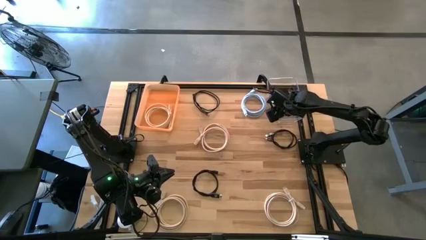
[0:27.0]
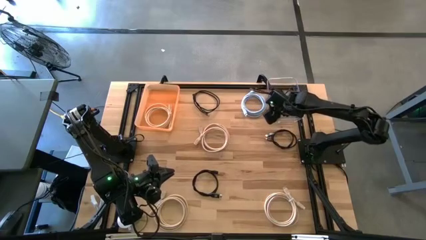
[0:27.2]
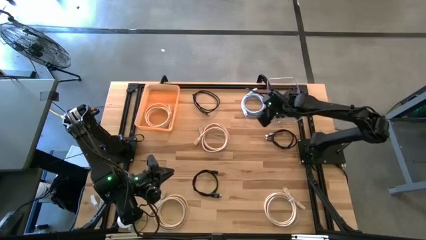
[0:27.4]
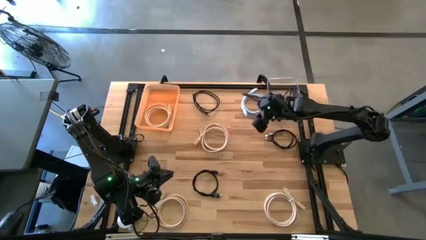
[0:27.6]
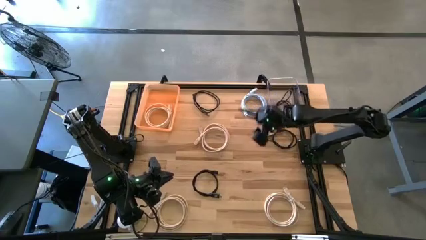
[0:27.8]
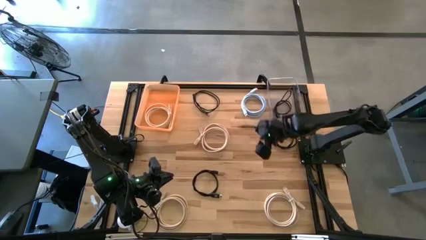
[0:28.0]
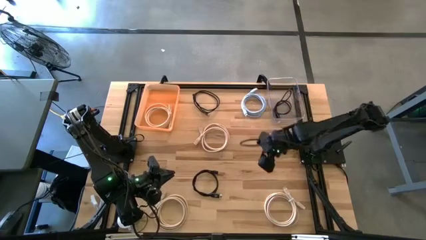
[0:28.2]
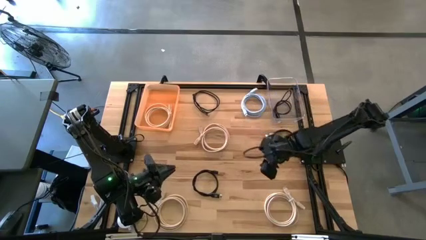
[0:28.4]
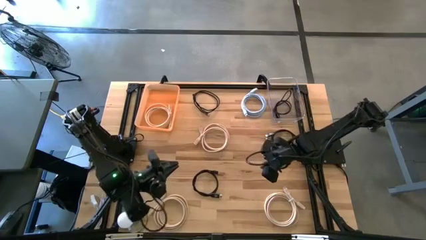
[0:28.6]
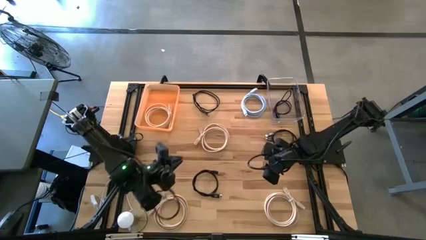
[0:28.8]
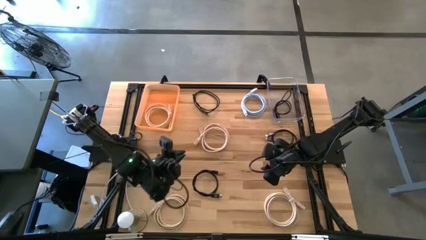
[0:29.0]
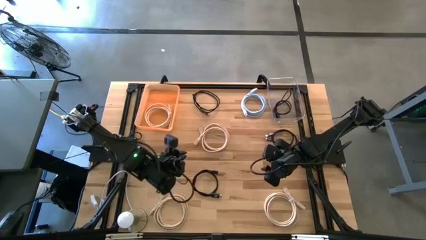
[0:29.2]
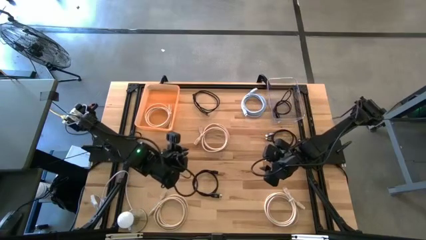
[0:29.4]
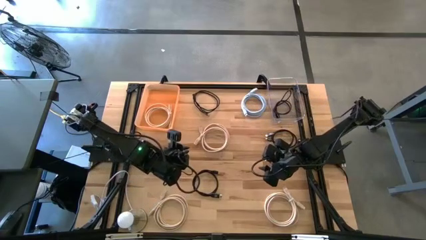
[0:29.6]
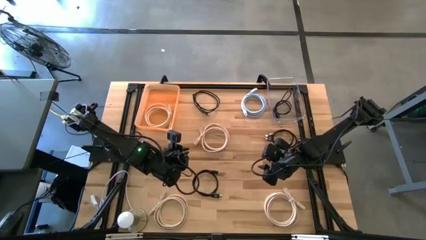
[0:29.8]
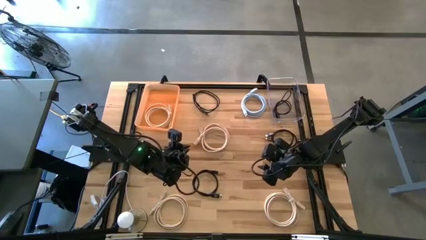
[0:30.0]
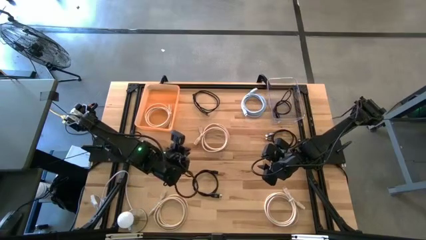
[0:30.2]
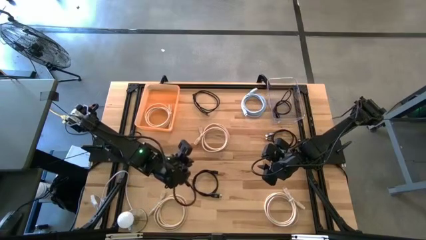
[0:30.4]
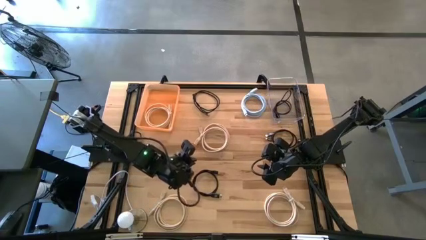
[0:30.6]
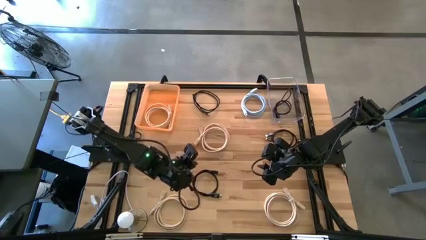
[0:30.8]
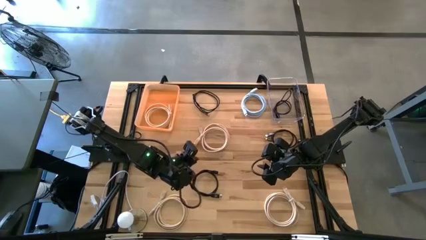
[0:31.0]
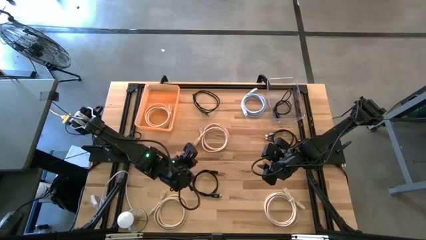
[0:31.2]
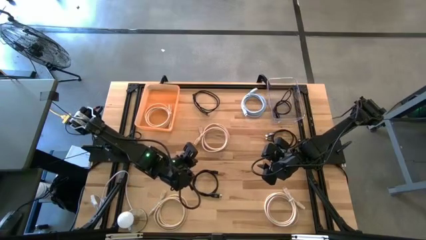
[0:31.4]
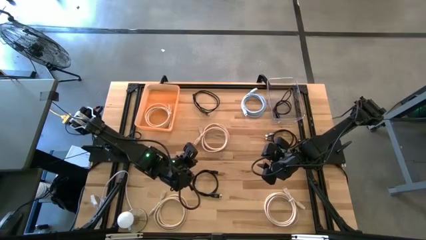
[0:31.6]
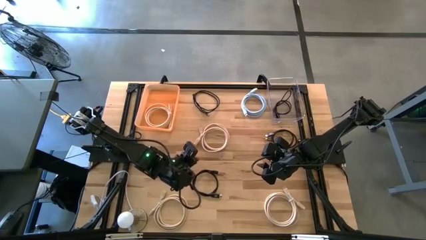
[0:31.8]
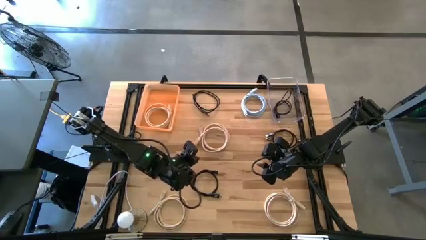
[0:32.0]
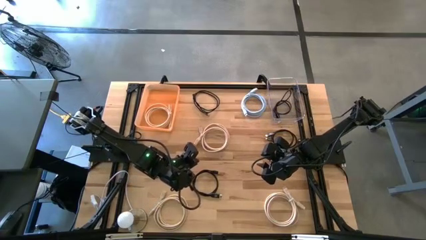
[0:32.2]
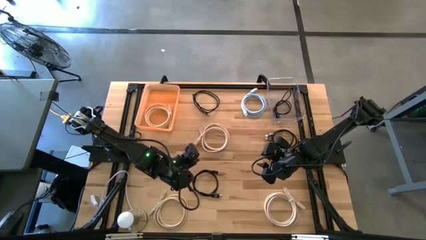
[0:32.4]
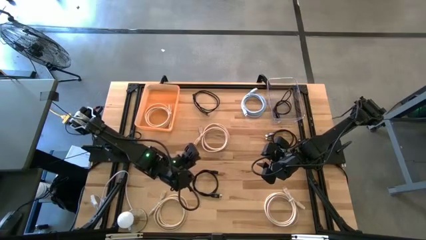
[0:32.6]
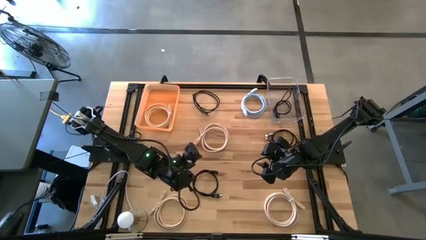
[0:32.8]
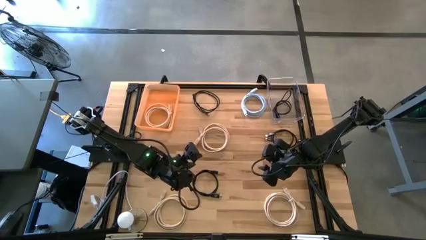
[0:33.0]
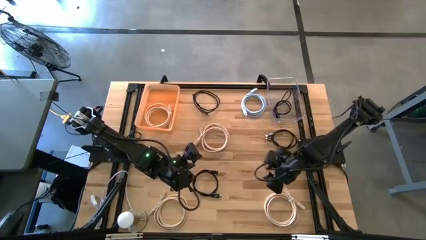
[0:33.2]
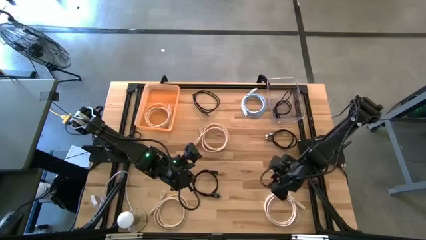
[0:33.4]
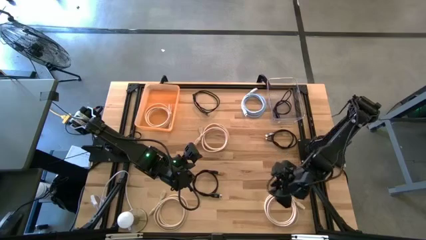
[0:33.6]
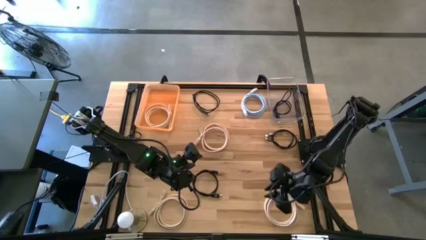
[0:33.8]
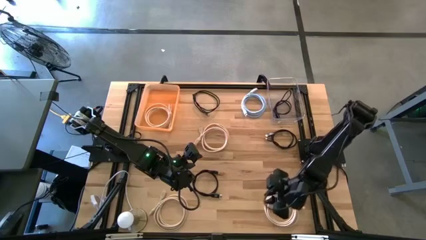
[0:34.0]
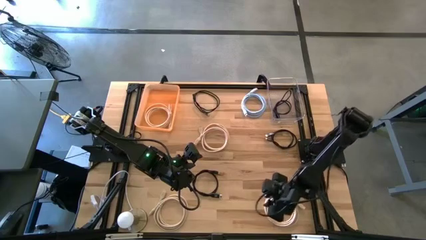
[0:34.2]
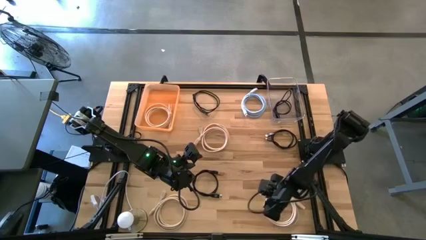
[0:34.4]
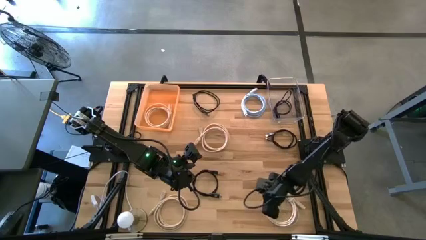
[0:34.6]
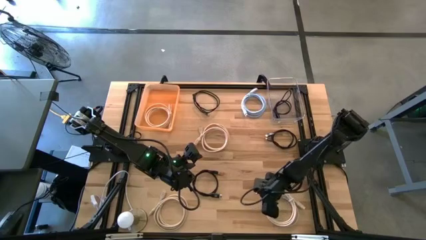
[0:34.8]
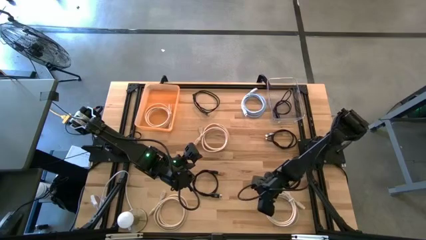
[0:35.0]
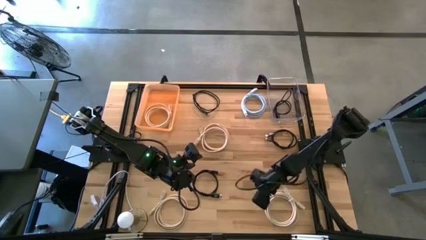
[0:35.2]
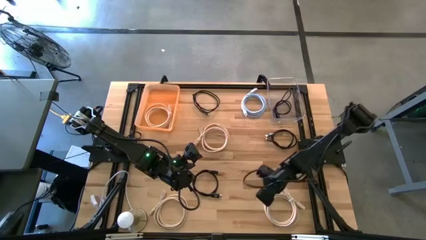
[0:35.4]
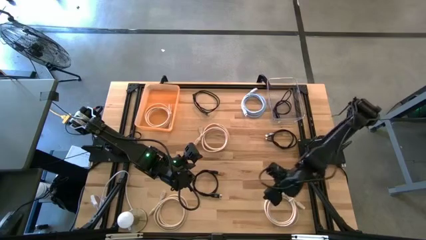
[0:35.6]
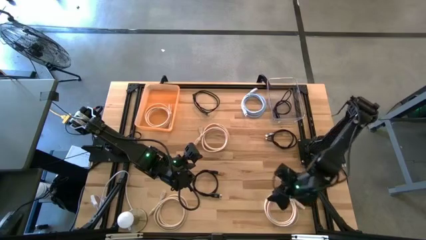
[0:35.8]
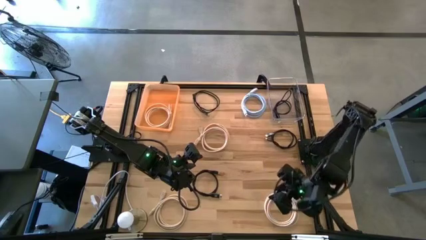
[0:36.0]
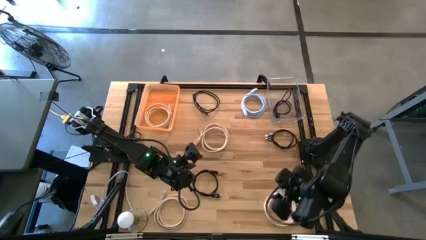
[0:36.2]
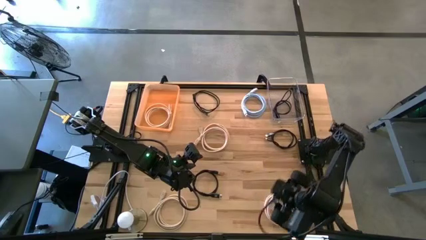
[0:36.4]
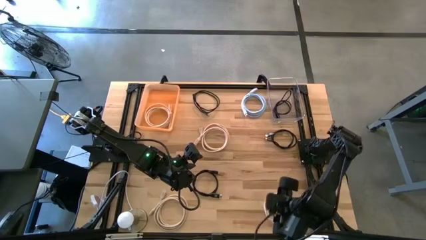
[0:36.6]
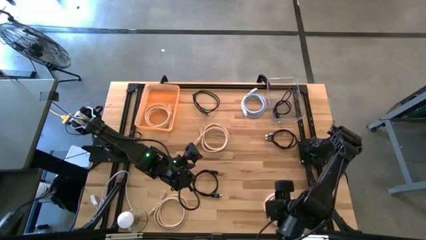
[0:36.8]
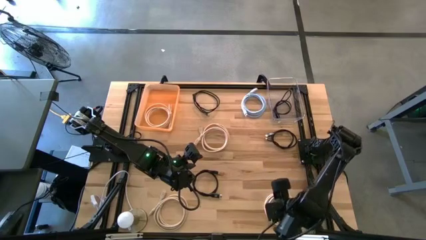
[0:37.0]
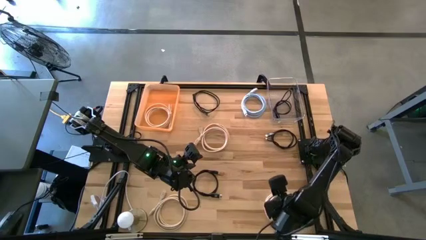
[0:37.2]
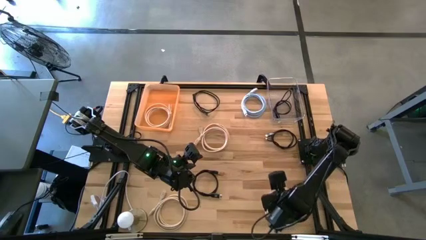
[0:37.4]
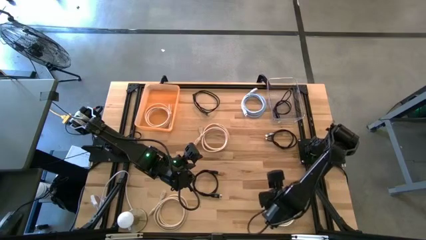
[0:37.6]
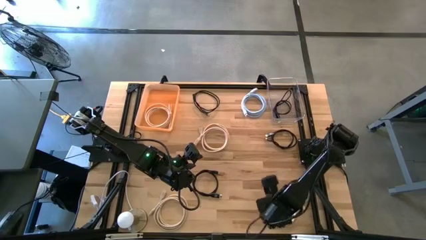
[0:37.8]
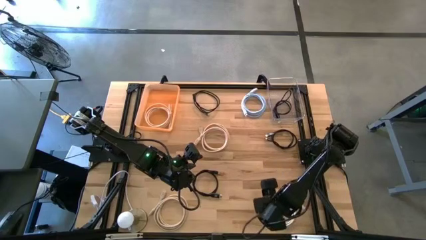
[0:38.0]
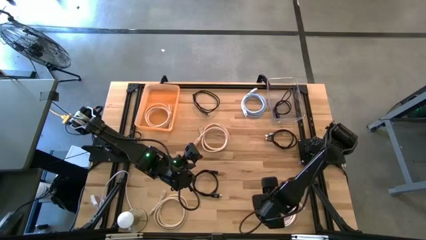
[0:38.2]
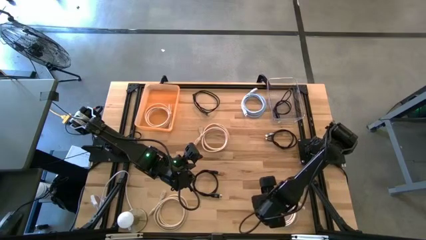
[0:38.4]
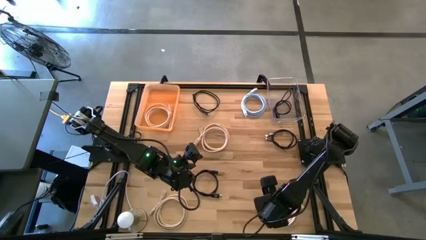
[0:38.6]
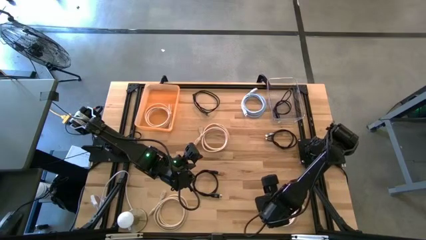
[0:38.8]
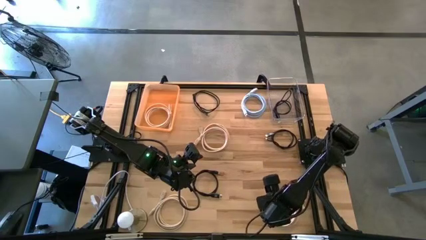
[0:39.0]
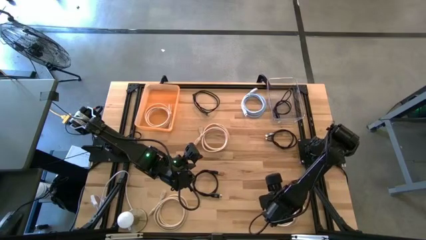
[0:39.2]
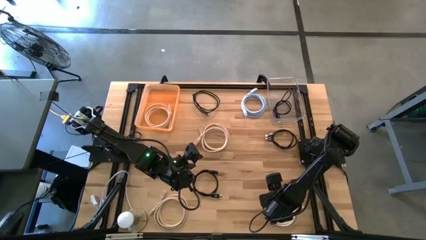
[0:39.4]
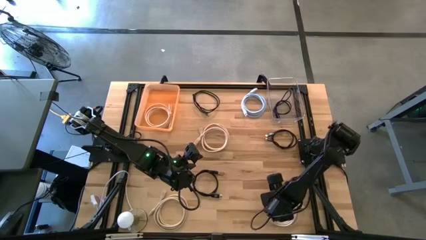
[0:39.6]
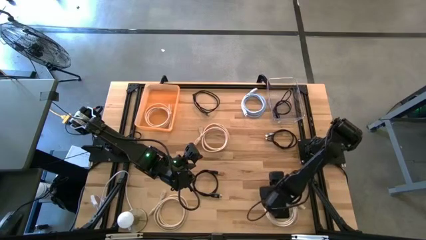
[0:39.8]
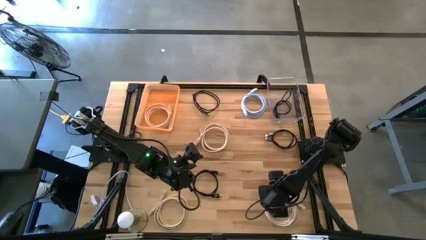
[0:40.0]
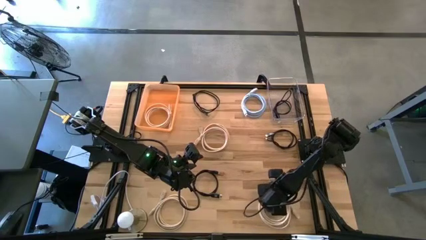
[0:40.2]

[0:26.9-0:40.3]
Task: Sort HDMI cables
Put the brown HDMI cable into the orange bin
